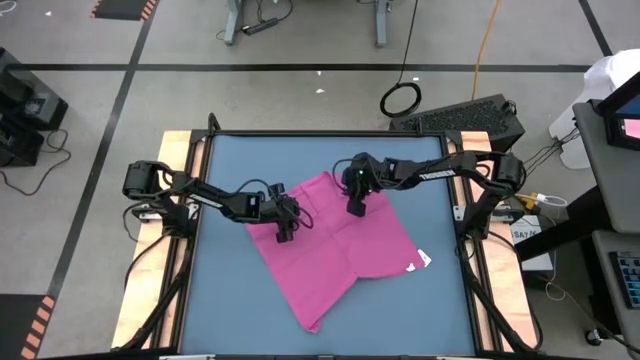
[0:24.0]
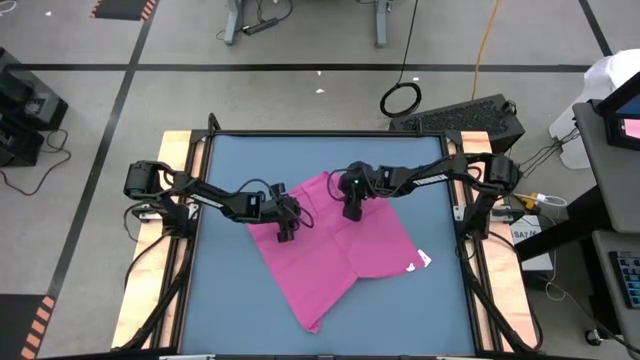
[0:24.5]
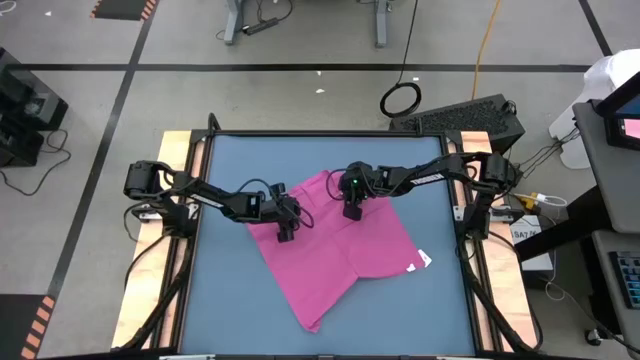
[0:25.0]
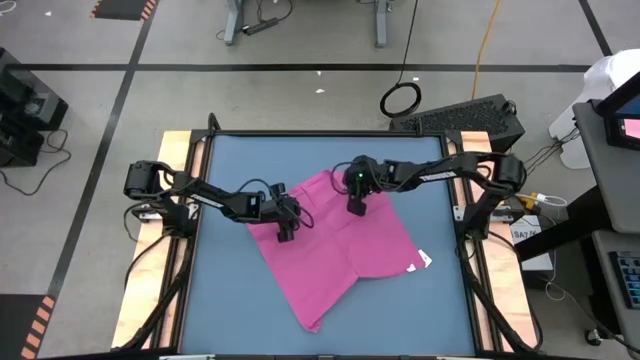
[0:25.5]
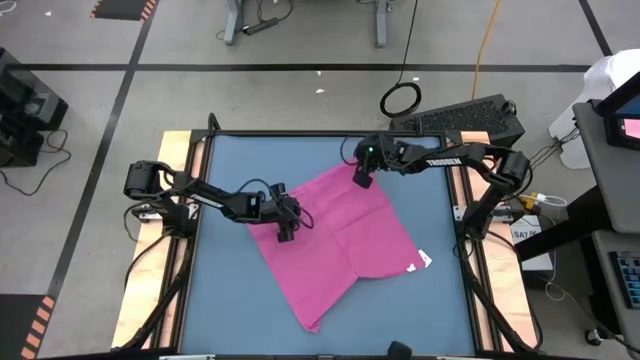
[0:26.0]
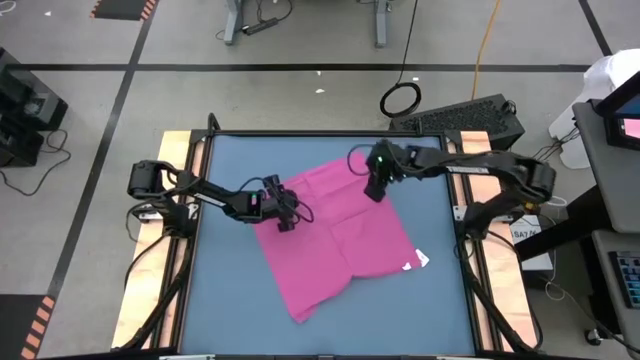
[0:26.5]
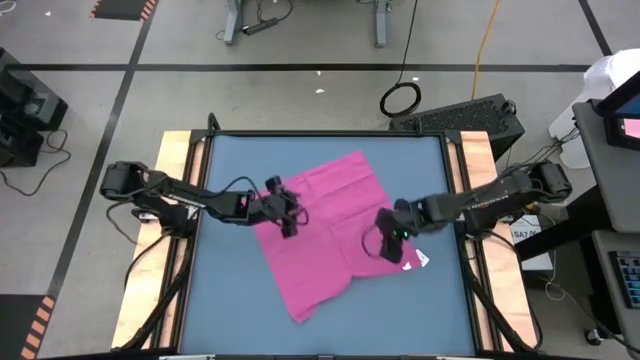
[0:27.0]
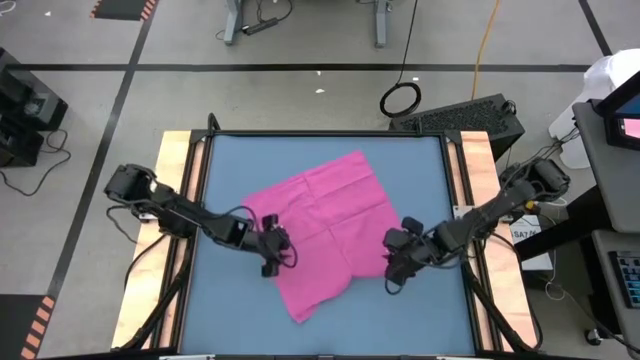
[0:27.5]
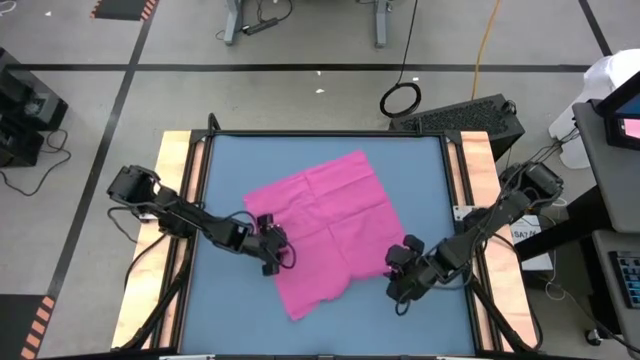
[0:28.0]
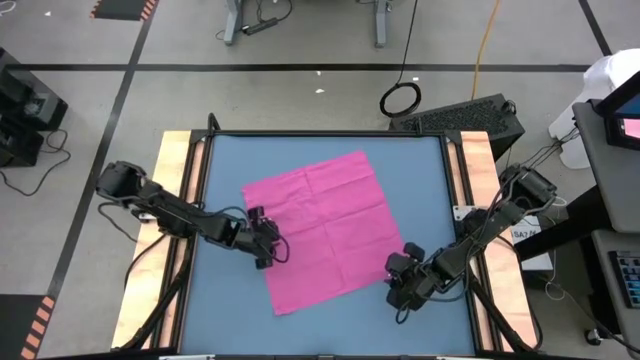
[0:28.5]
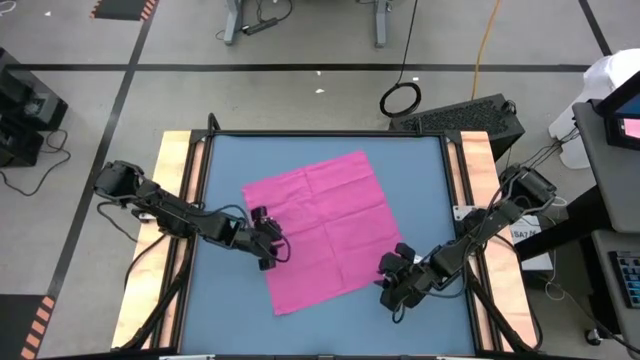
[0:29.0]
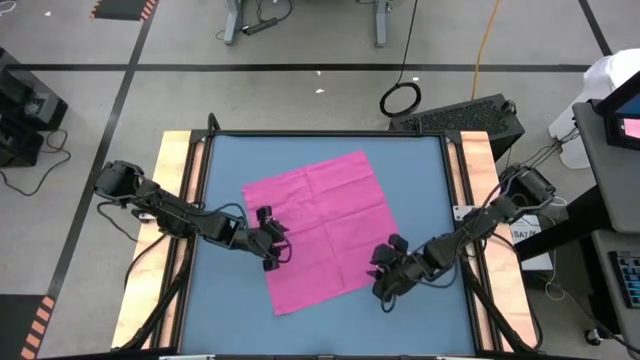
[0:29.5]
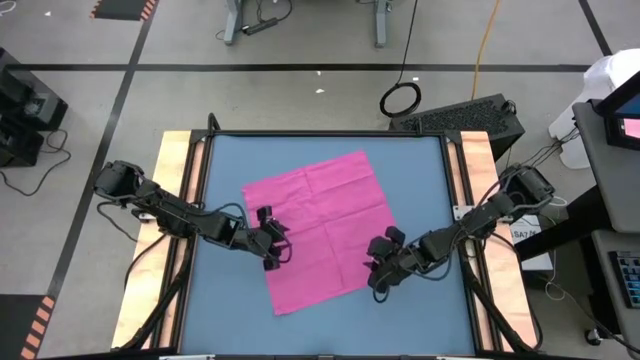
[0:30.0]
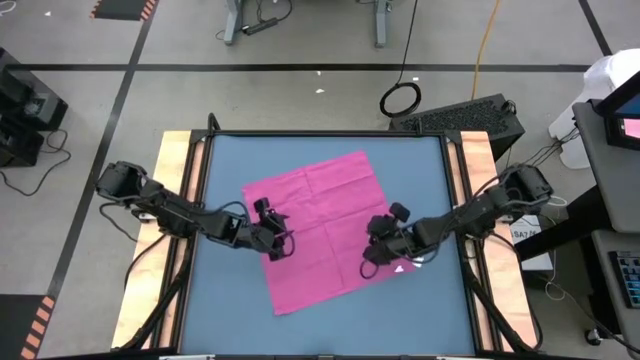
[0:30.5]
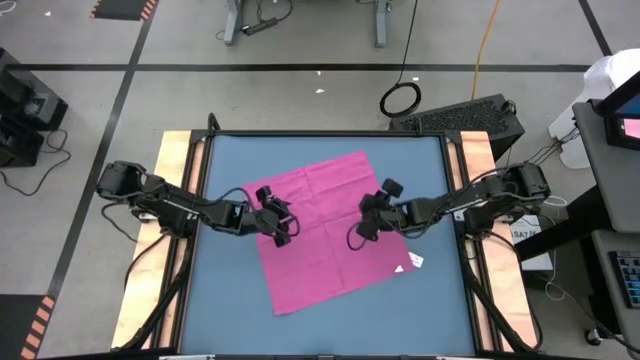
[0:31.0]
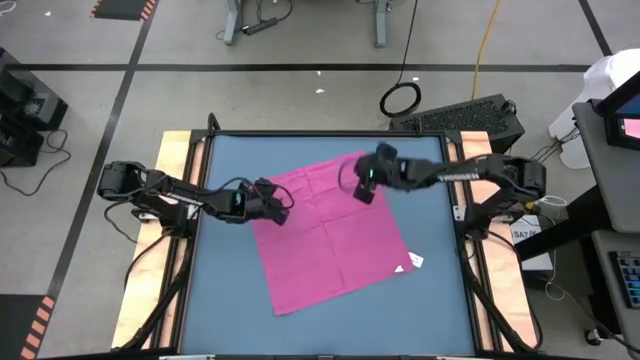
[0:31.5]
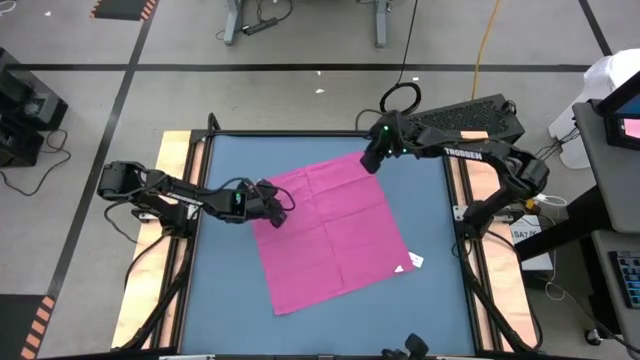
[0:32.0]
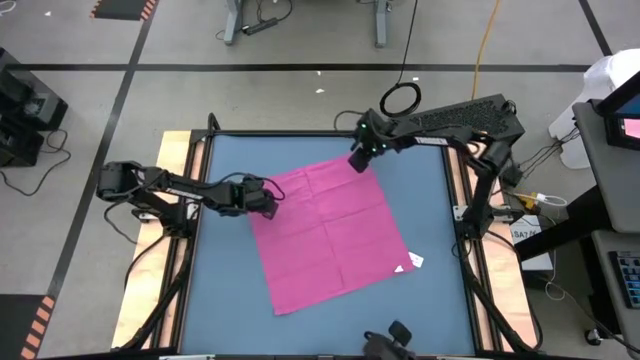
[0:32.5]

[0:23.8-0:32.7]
Task: Roll towel into tight, uniform cylinder
Fold the pink towel

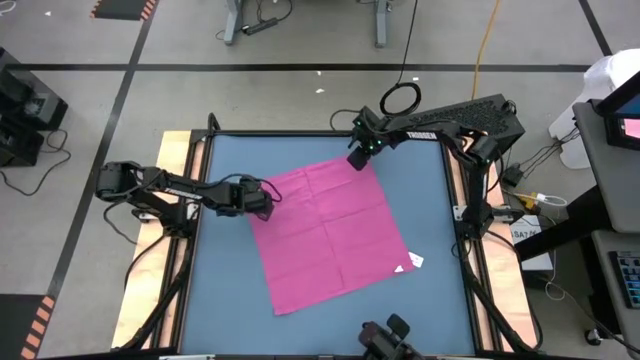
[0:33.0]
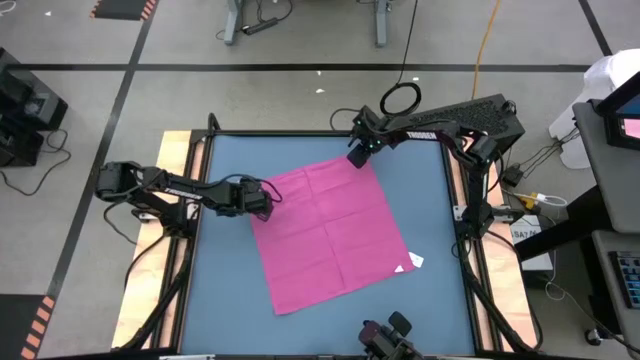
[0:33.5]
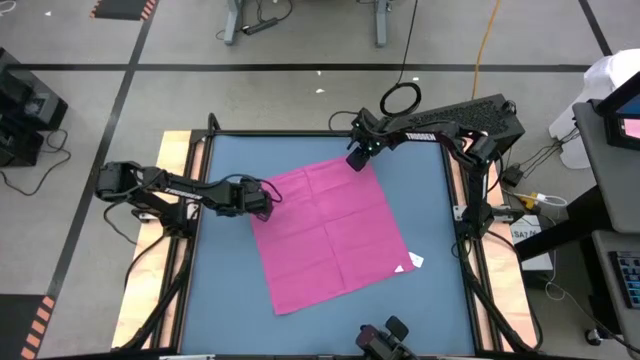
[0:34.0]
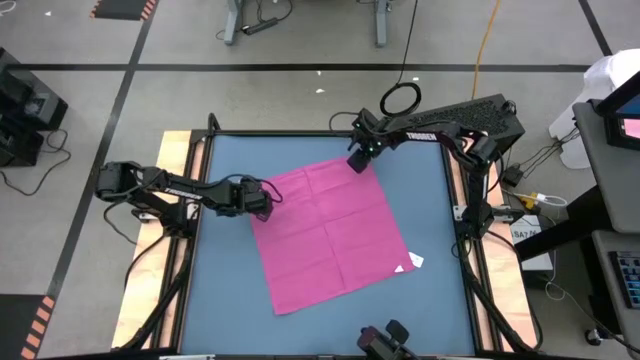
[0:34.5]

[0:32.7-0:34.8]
Fold the pink towel

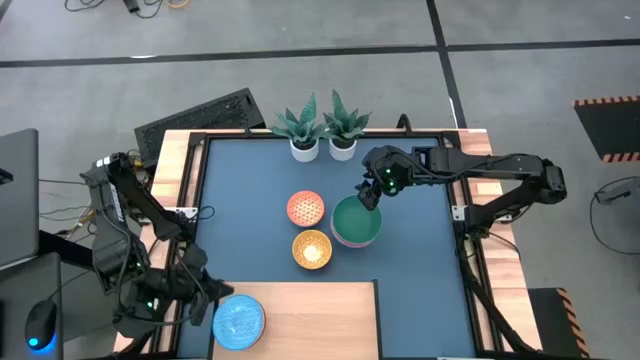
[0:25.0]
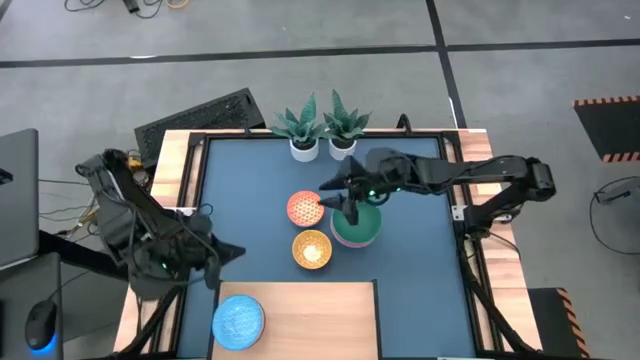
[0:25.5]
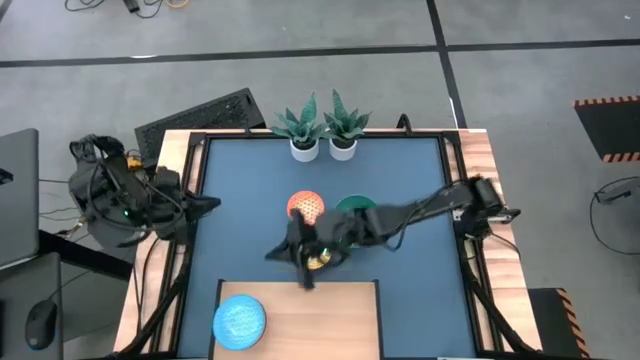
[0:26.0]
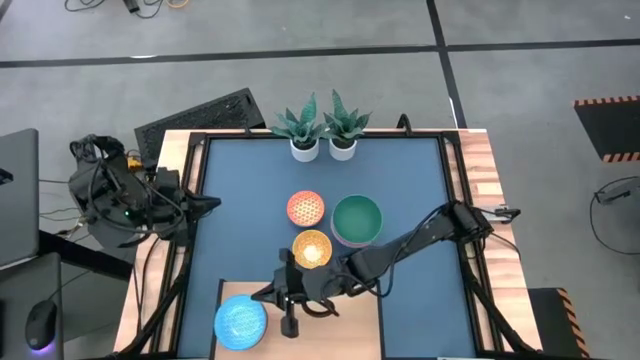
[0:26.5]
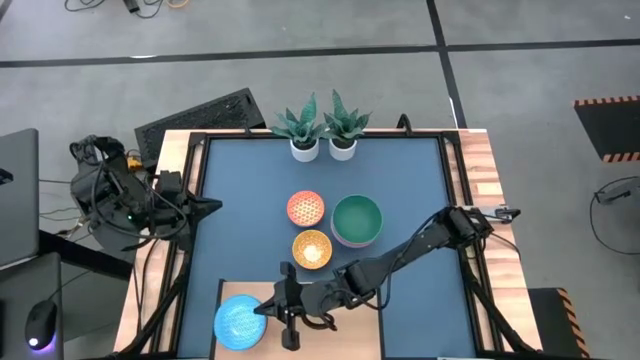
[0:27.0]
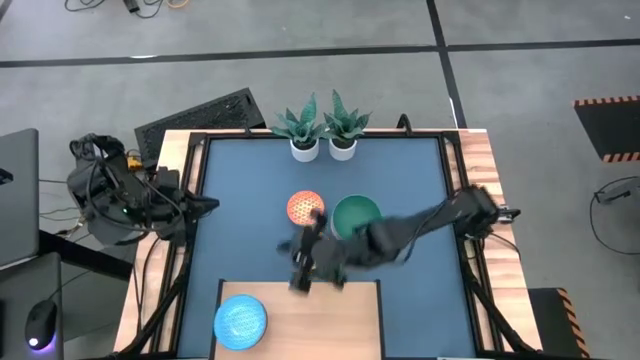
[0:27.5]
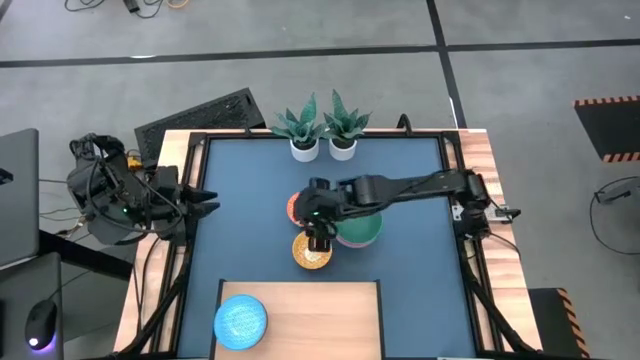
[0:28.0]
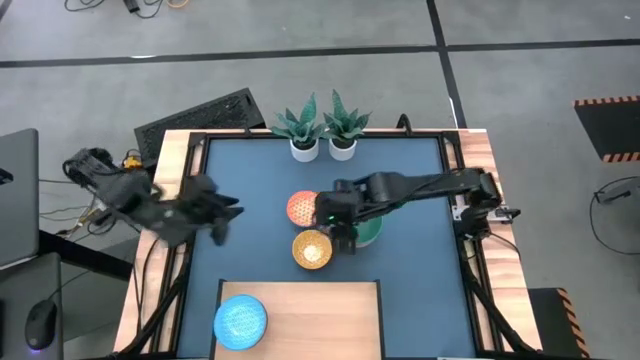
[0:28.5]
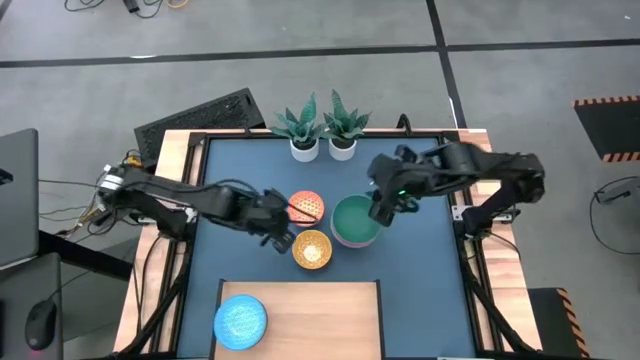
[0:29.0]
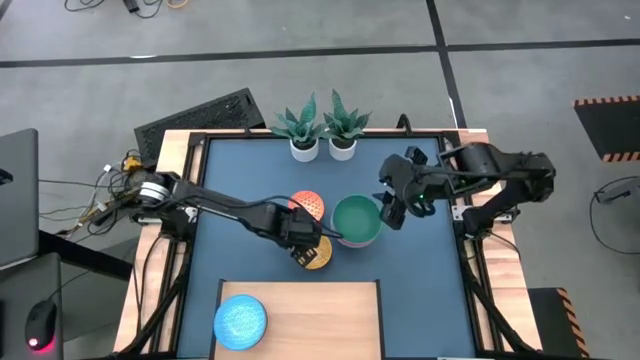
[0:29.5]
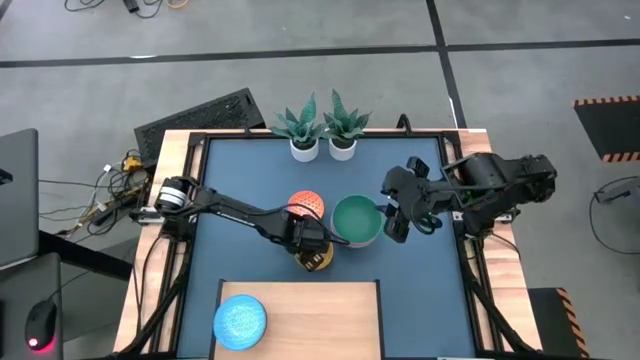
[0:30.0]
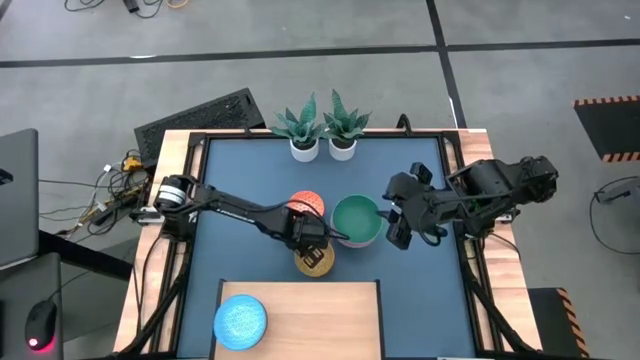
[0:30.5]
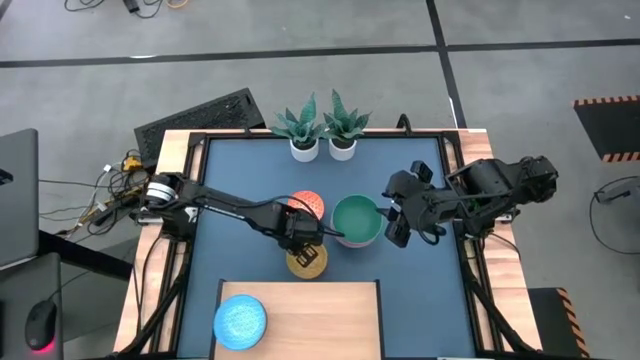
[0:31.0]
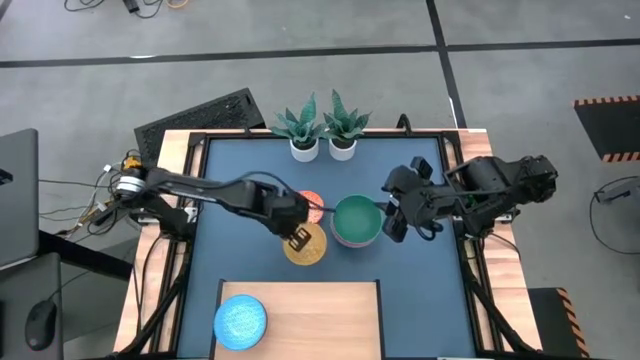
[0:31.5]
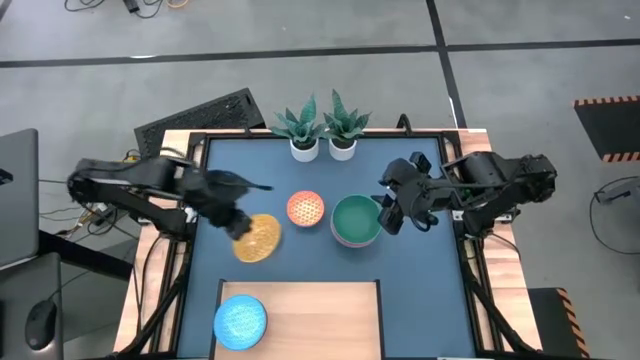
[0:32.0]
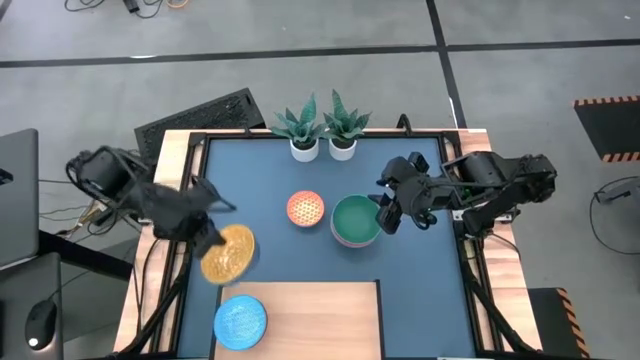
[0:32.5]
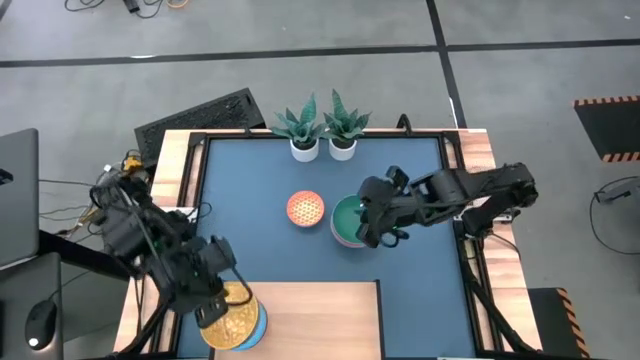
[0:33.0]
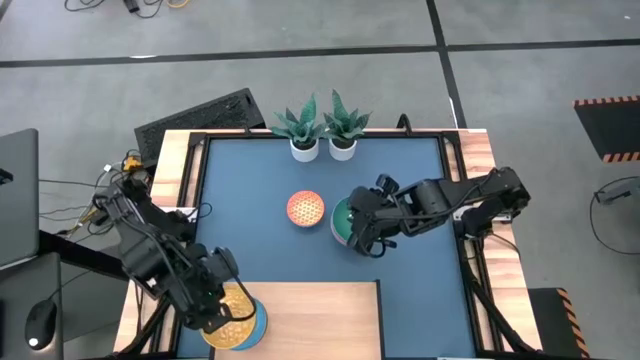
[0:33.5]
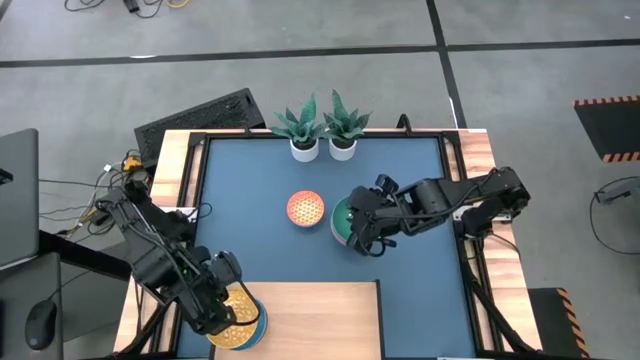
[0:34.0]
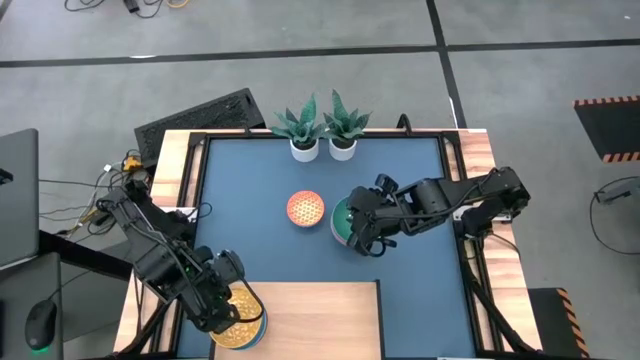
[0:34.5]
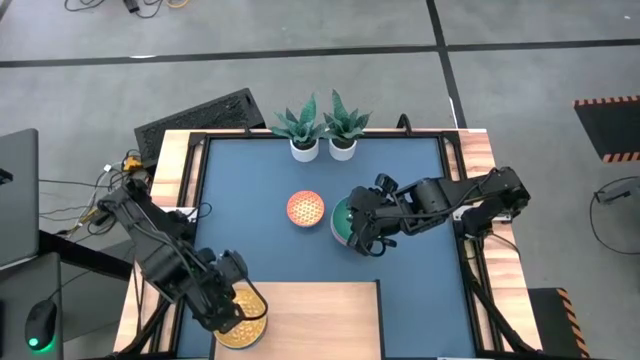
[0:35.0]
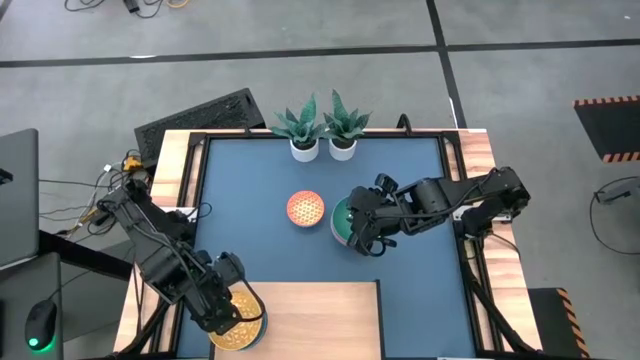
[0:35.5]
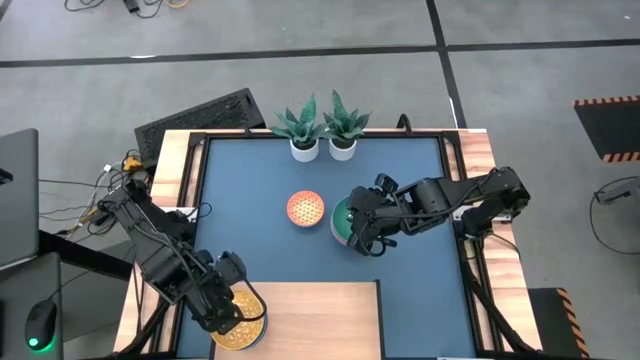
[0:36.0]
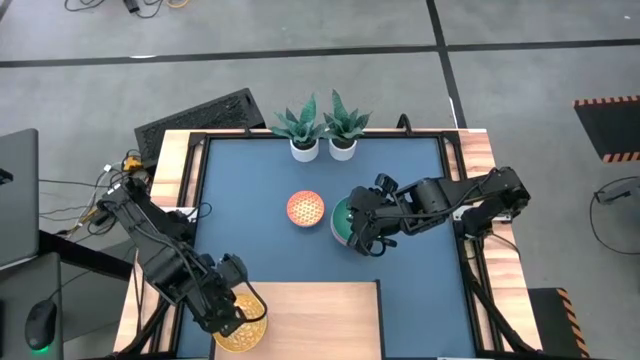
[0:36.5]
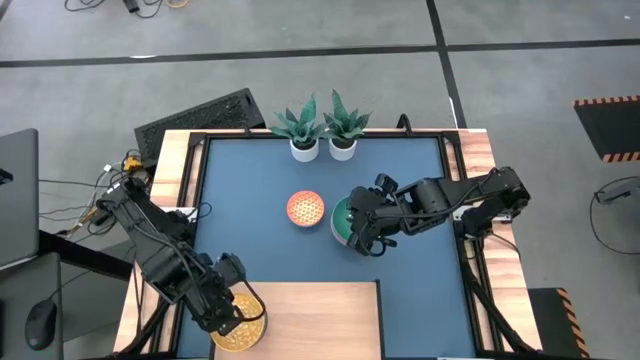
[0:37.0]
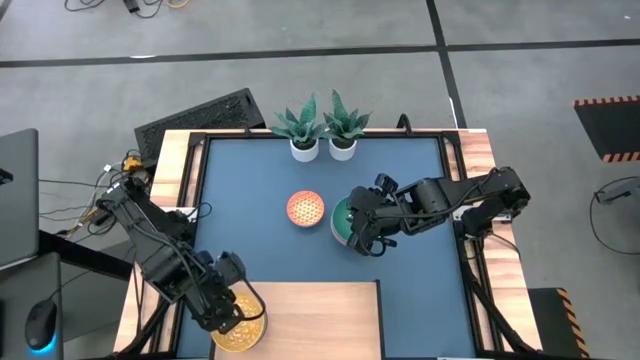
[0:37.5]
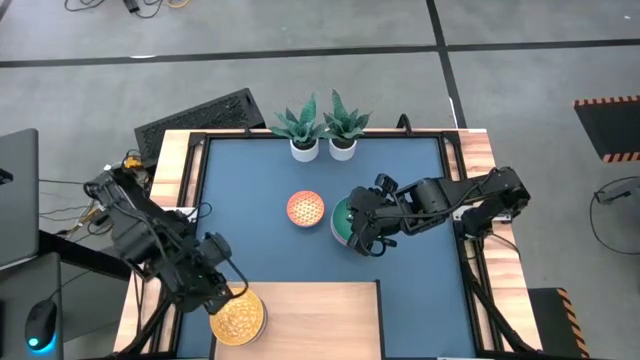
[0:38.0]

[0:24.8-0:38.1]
Task: Place and stack bowls onto a shelf
Stack the yellow and white bowl on top of the light blue and white bowl on the shelf
